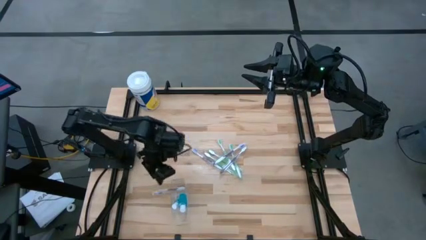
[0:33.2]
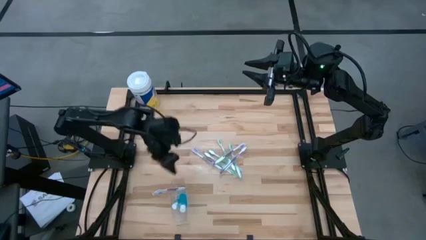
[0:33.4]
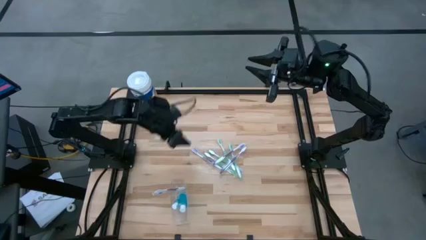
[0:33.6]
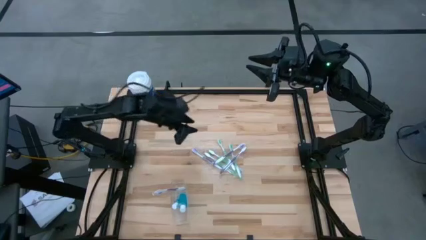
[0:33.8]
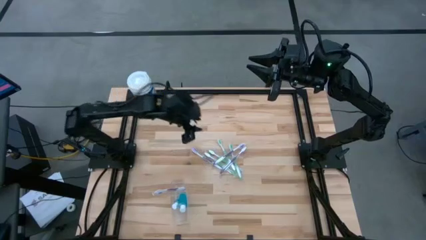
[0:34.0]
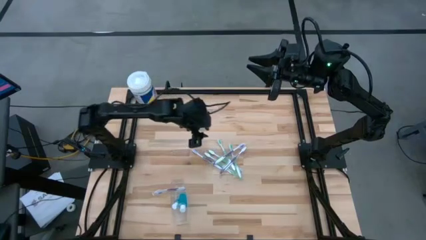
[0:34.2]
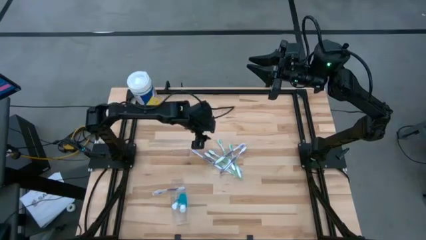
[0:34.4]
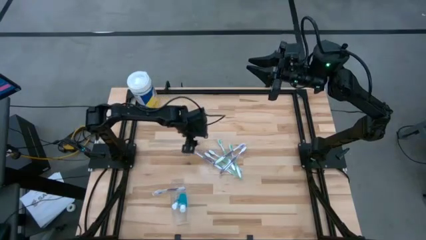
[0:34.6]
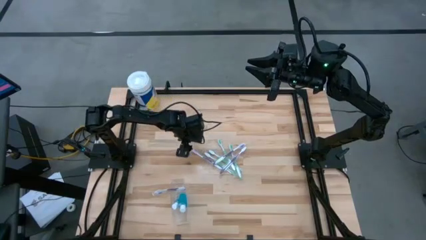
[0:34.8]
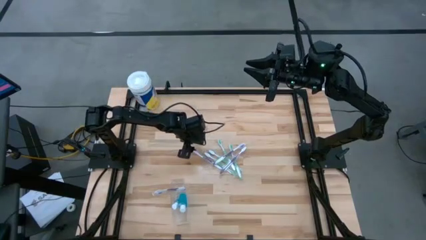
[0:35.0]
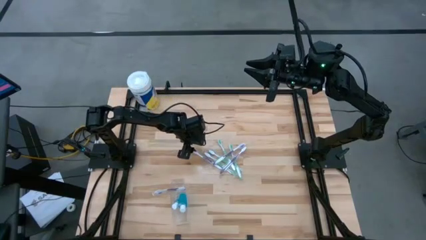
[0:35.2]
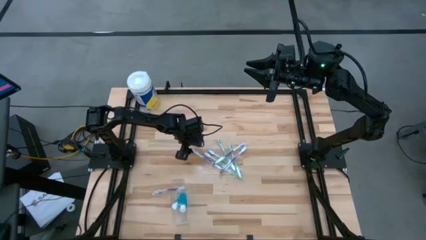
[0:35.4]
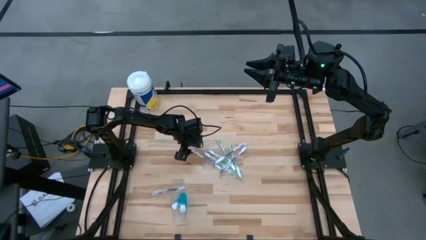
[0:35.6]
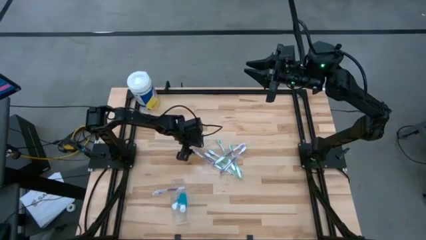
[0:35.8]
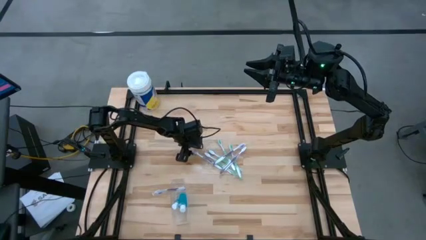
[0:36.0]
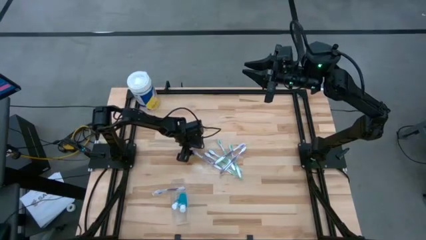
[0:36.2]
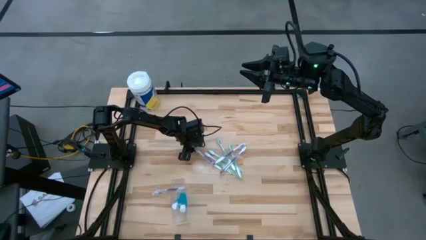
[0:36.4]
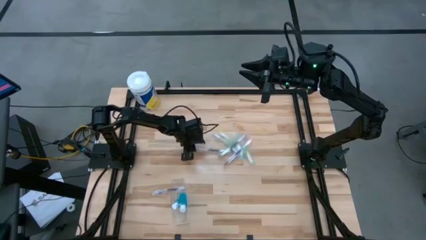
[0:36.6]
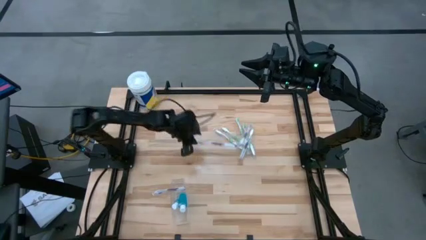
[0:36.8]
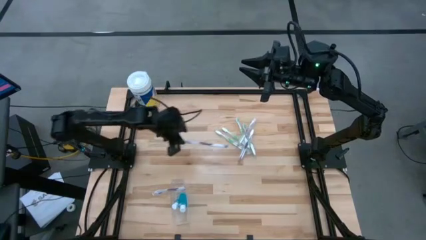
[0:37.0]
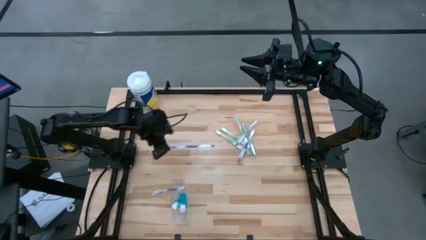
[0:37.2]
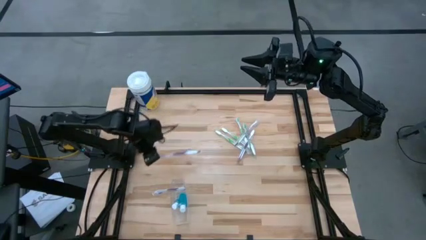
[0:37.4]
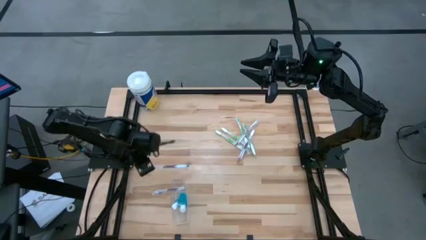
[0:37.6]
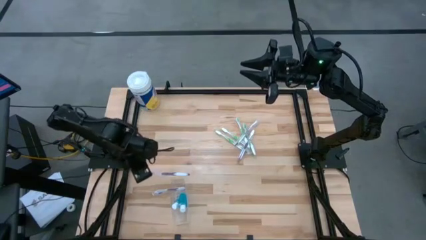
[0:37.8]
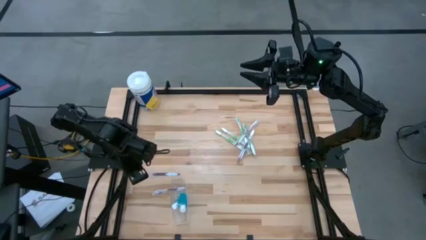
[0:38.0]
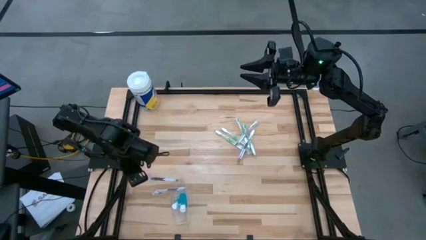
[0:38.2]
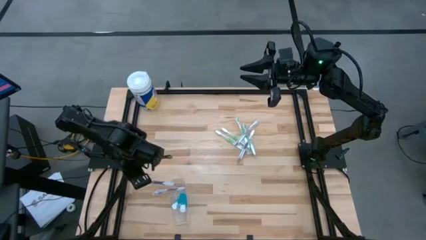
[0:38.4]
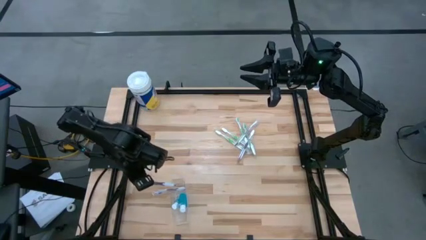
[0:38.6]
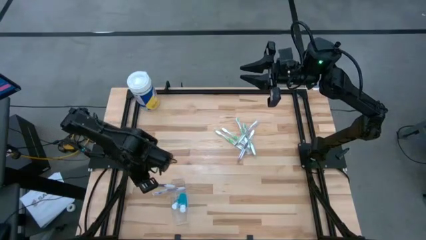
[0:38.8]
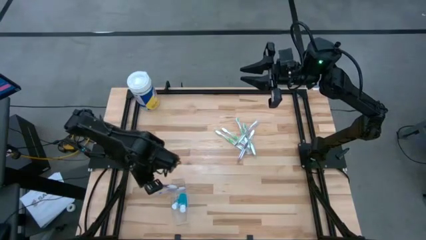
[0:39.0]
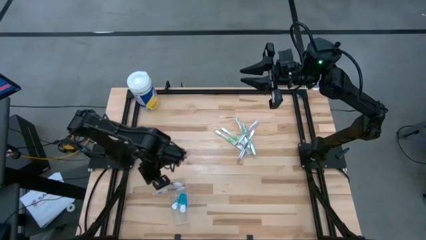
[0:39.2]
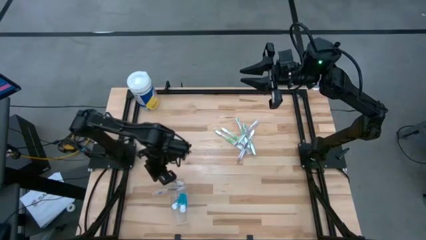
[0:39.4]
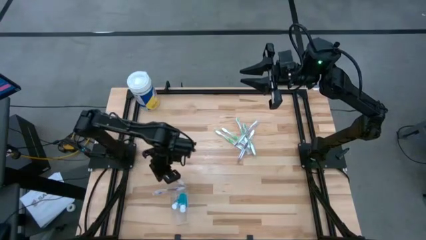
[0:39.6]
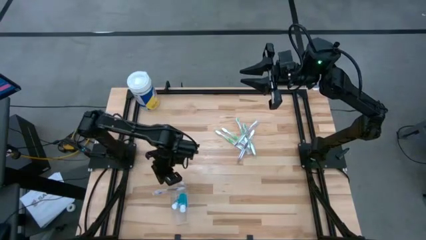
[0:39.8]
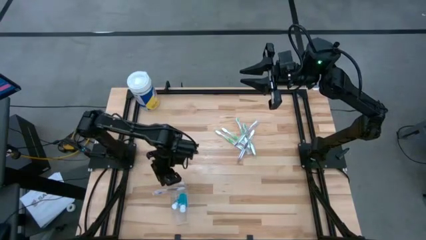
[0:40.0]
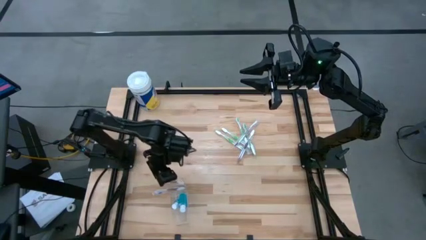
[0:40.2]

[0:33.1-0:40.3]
Task: Pick & Place toothbrushing station
Put the purple toothbrush into the transparent organizer

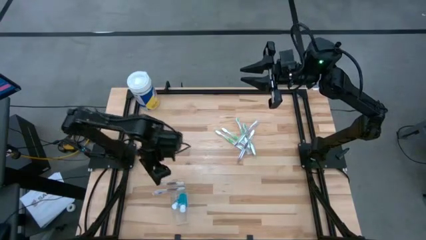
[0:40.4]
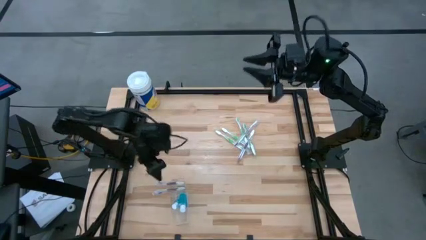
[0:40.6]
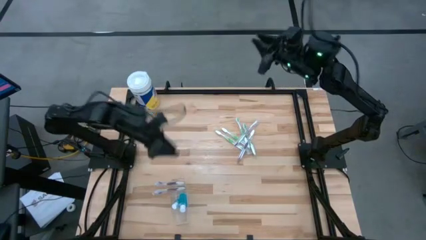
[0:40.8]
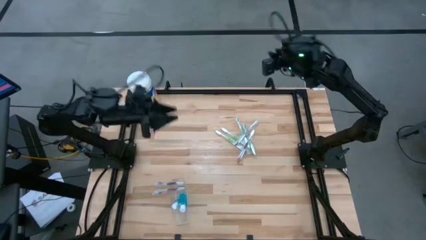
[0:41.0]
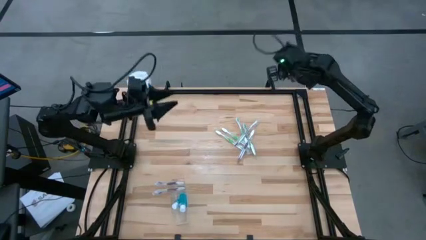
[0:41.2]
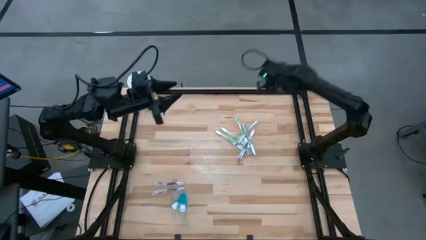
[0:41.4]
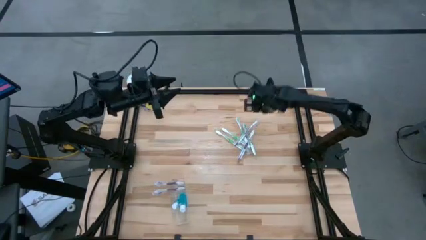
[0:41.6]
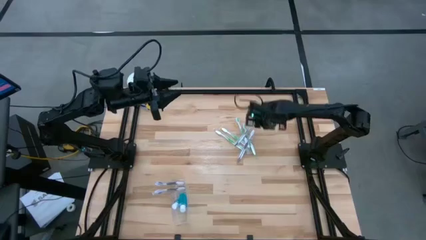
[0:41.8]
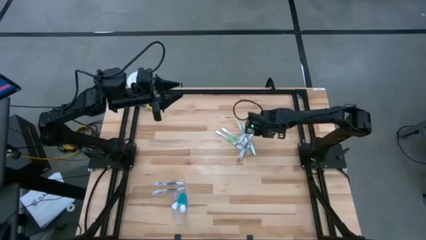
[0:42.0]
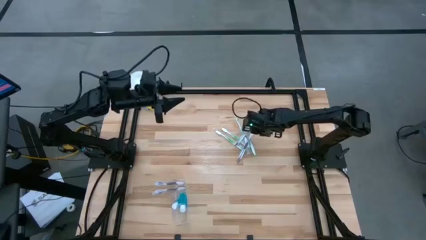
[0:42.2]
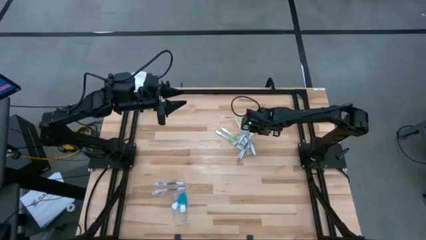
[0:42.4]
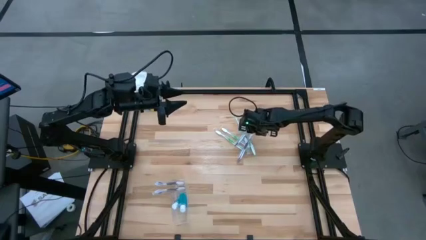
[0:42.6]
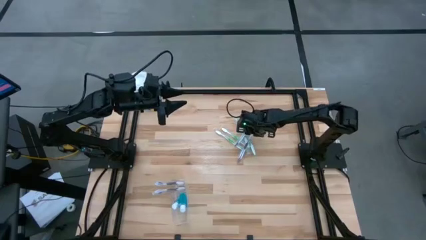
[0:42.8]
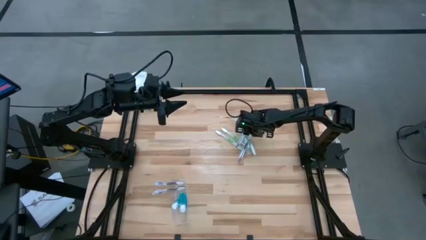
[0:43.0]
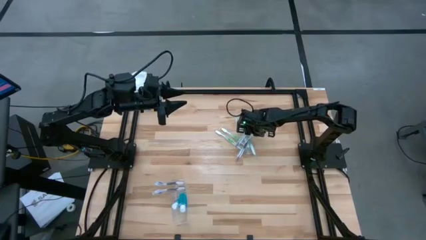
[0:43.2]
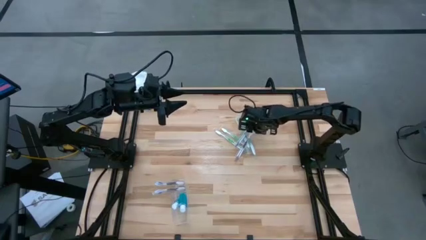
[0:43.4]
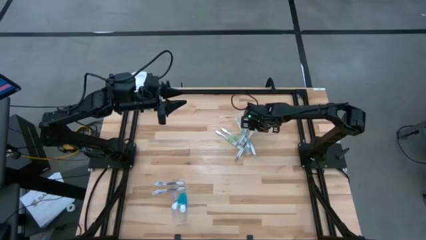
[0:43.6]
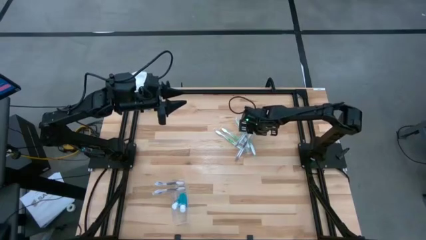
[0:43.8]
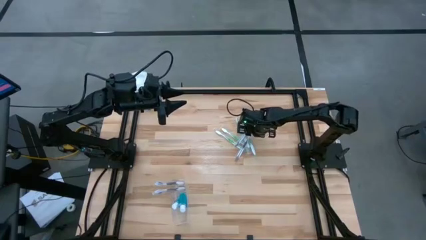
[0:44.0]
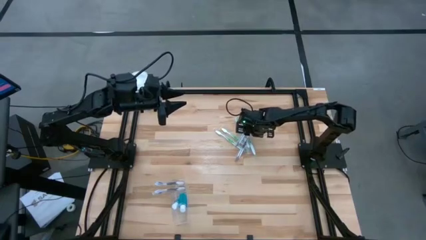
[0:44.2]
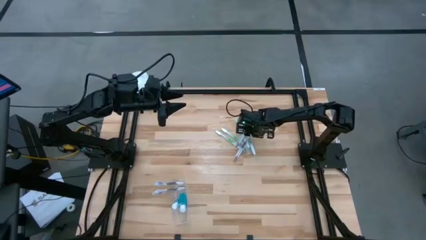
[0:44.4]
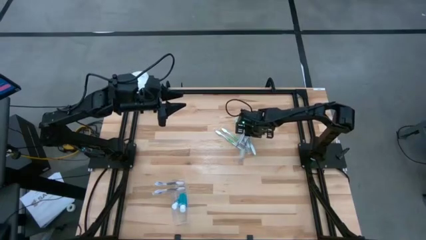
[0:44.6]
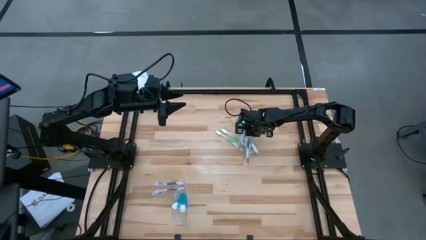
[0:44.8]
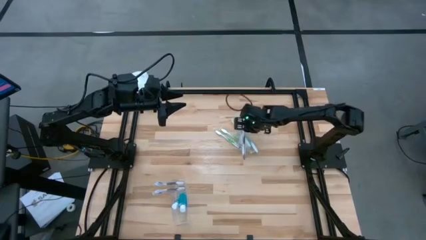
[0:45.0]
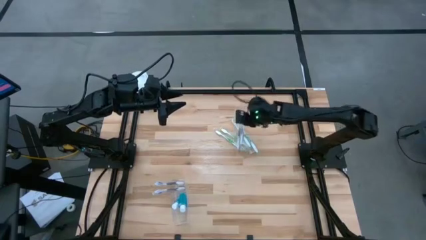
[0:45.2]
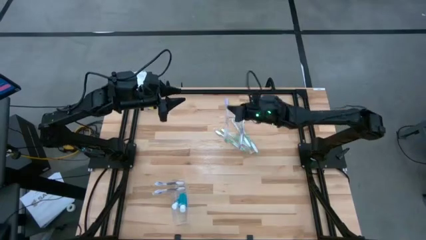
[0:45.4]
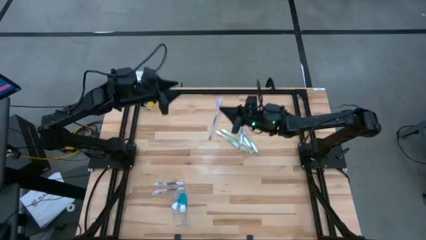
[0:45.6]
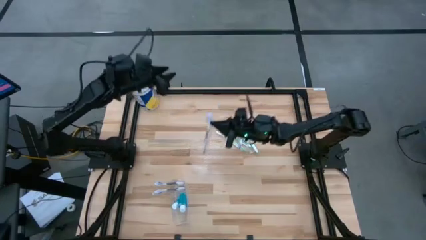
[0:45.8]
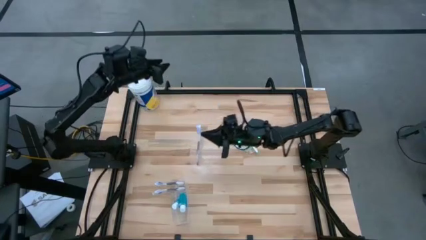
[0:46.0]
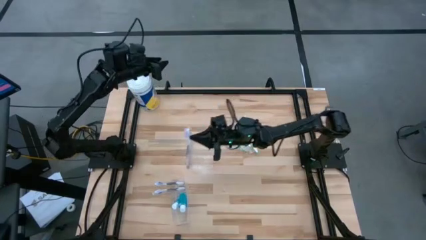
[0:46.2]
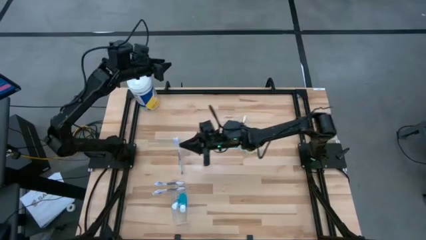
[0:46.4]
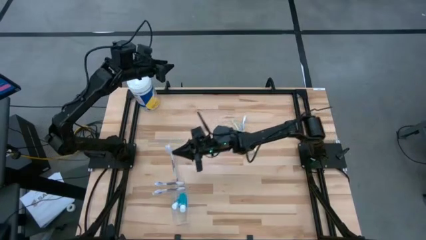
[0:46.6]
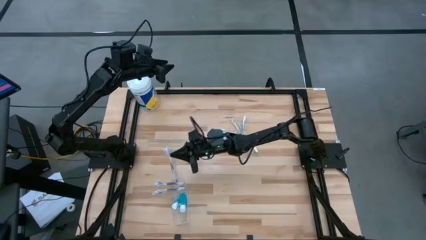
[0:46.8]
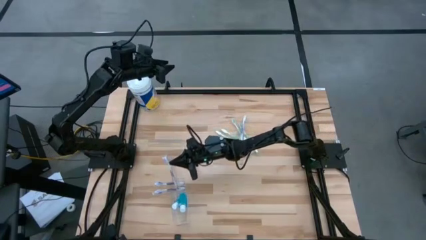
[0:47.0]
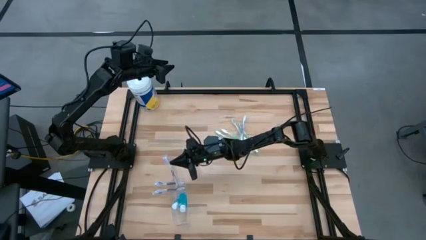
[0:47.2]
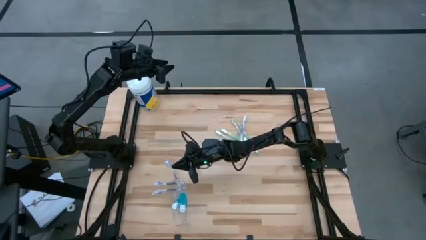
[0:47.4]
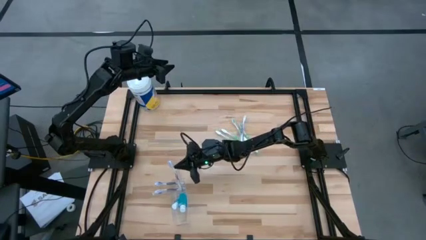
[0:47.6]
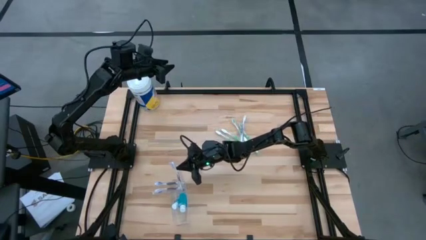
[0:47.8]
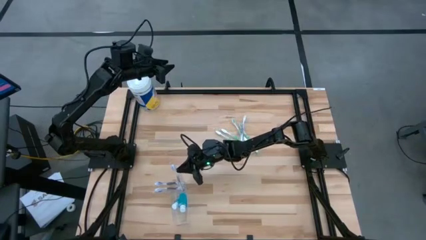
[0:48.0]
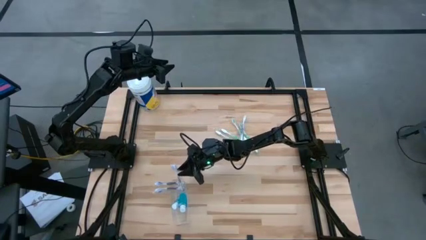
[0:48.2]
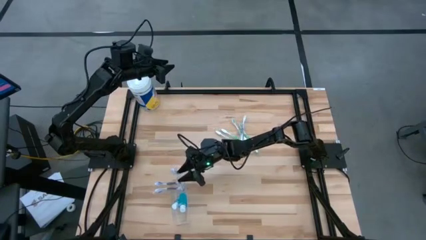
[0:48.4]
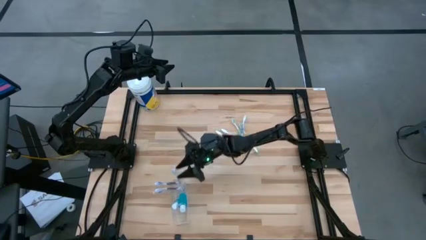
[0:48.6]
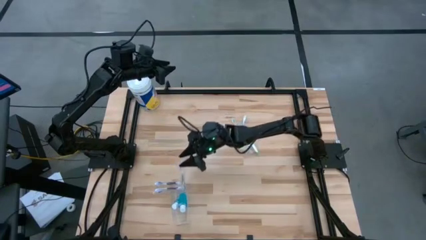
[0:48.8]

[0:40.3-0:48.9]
Put the purple toothbrush into the transparent organizer

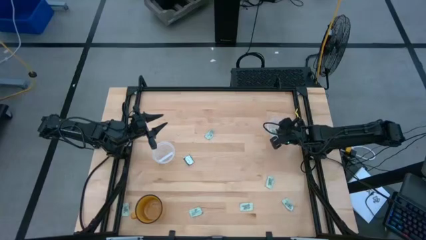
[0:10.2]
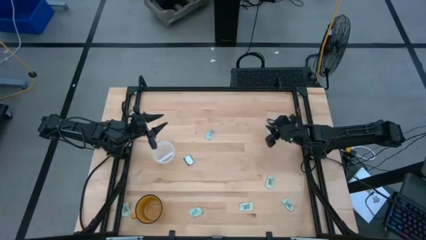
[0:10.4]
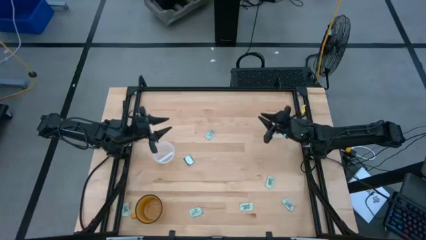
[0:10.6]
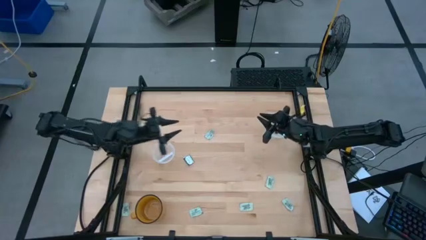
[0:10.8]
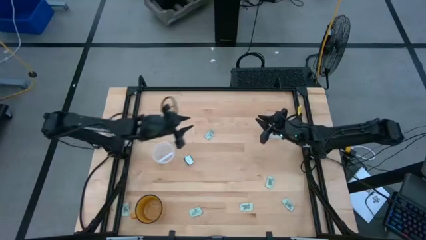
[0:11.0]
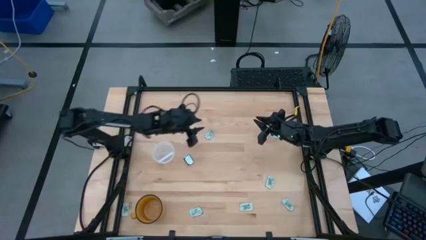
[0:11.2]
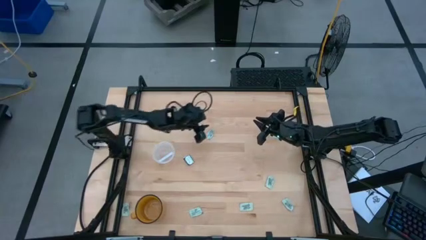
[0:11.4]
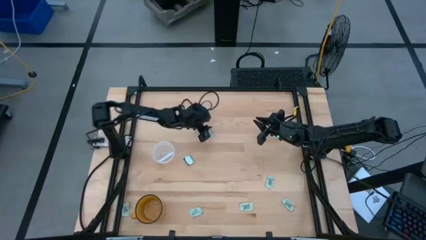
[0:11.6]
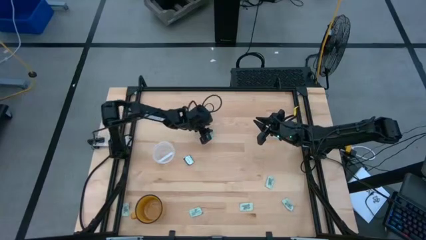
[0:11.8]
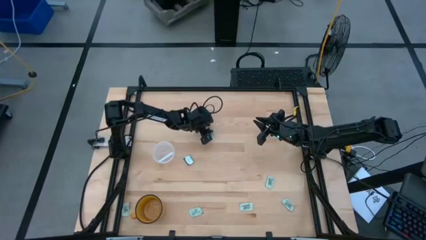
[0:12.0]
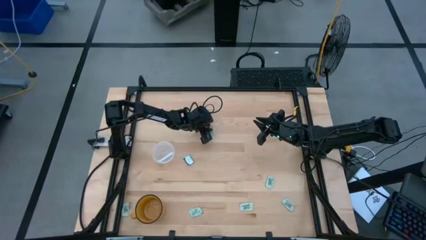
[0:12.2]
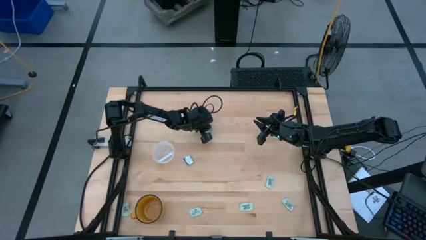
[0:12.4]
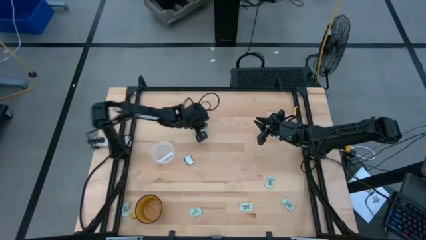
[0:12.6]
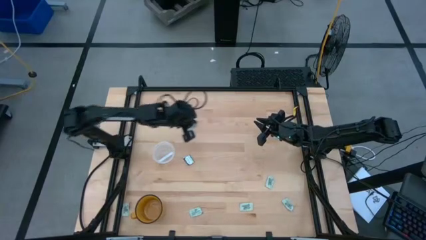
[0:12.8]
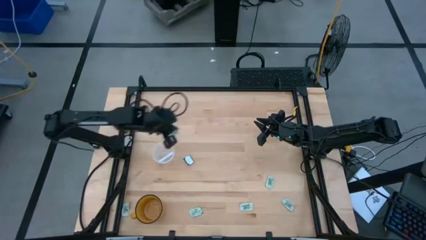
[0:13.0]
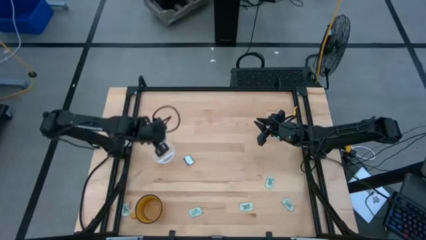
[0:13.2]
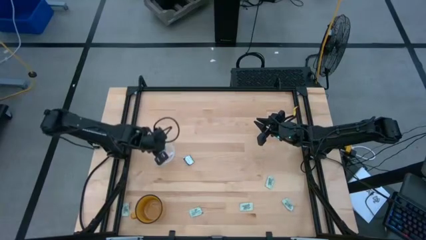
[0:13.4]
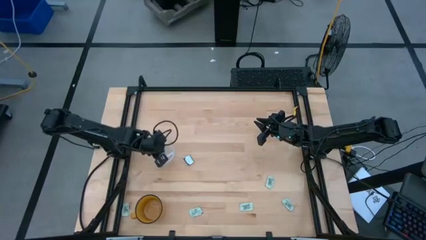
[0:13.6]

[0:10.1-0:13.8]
Task: Pick and place items into bin
Put the green stevia packet into the left transparent bin
